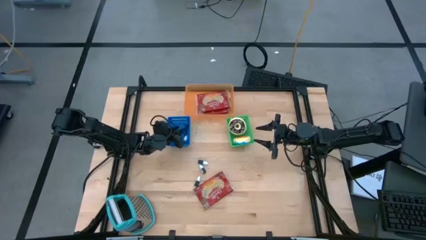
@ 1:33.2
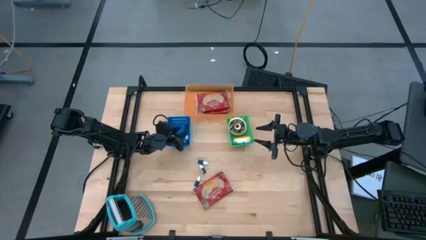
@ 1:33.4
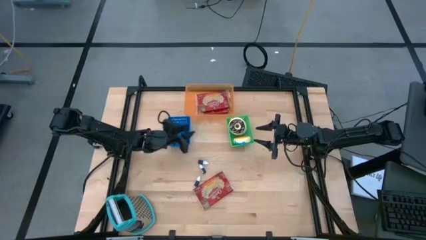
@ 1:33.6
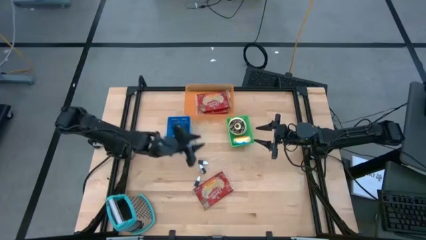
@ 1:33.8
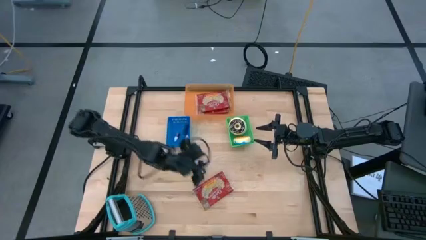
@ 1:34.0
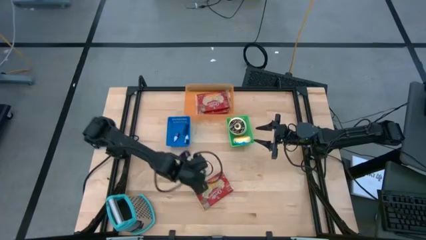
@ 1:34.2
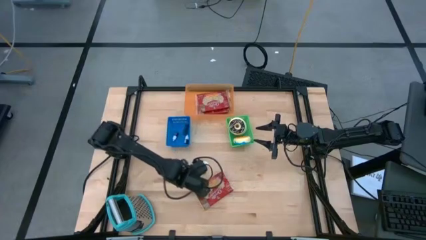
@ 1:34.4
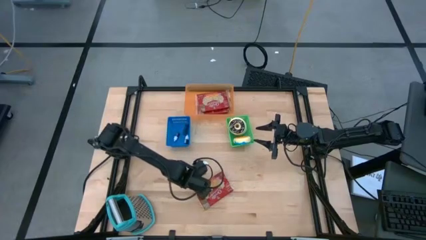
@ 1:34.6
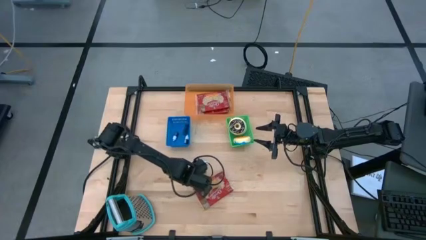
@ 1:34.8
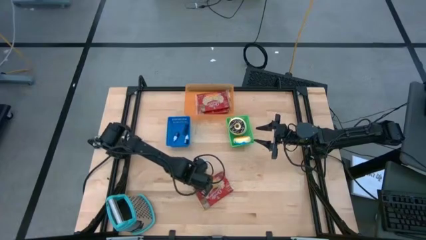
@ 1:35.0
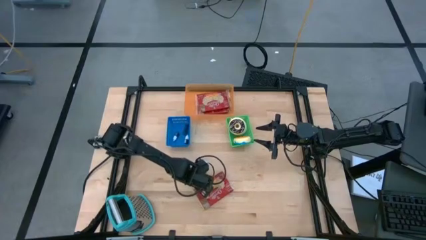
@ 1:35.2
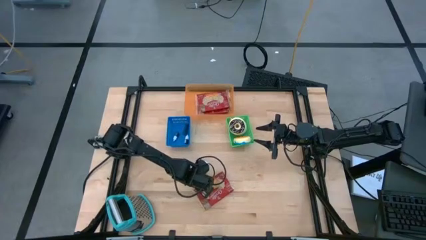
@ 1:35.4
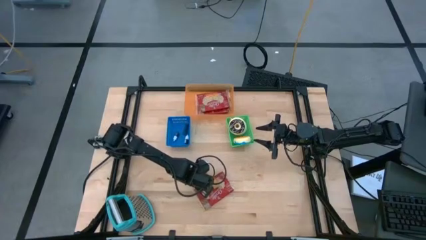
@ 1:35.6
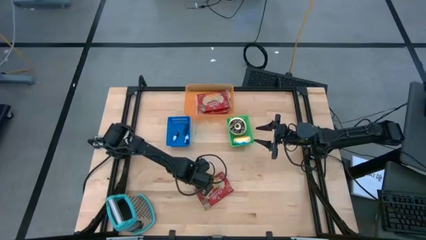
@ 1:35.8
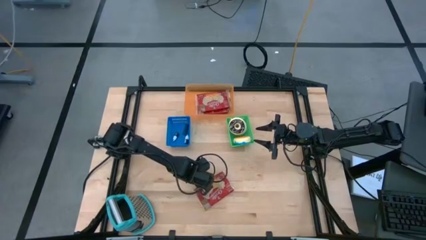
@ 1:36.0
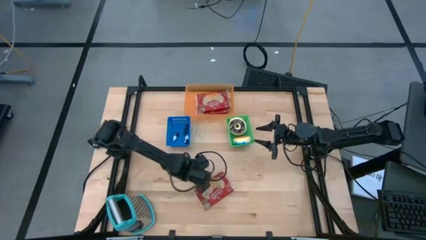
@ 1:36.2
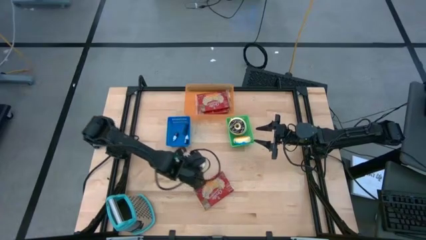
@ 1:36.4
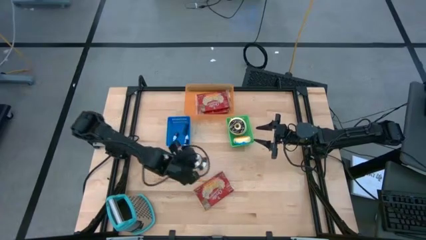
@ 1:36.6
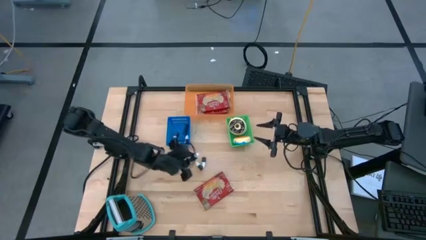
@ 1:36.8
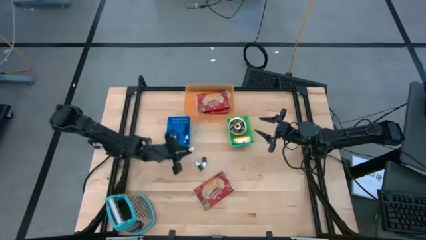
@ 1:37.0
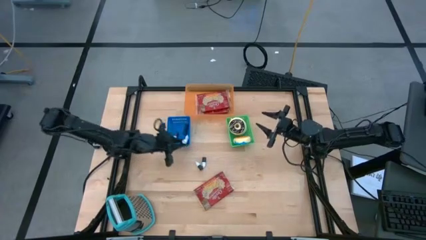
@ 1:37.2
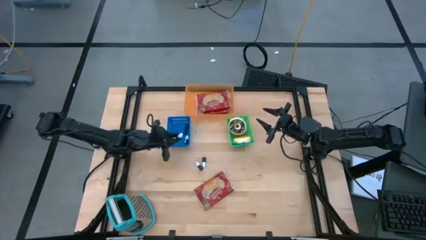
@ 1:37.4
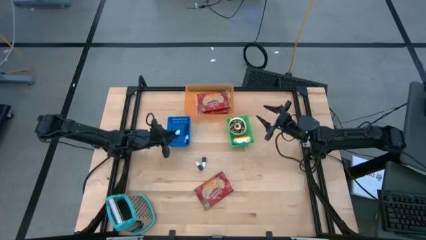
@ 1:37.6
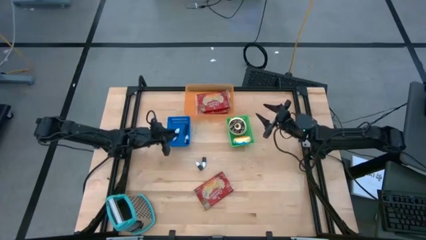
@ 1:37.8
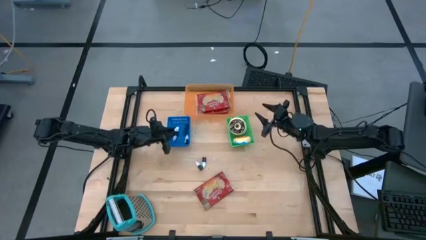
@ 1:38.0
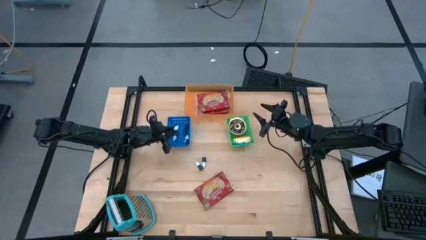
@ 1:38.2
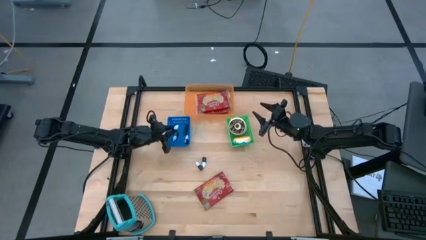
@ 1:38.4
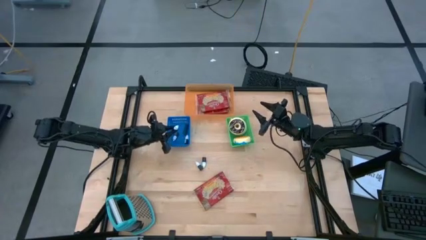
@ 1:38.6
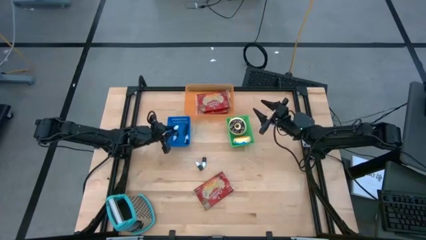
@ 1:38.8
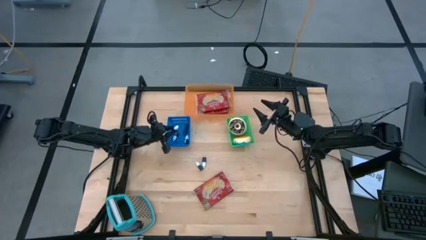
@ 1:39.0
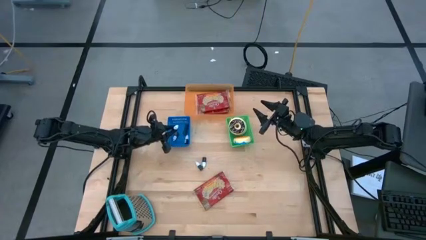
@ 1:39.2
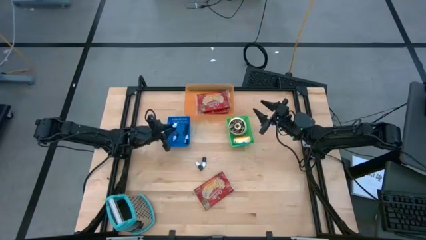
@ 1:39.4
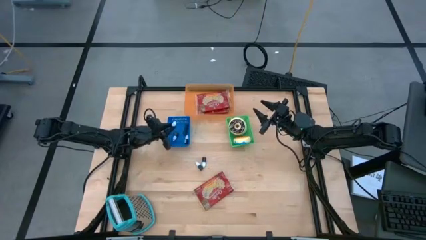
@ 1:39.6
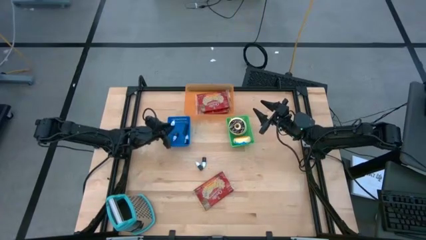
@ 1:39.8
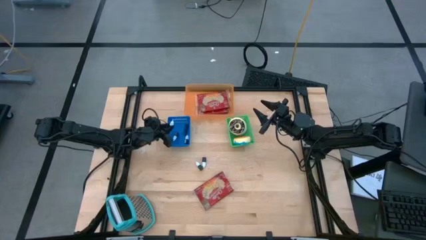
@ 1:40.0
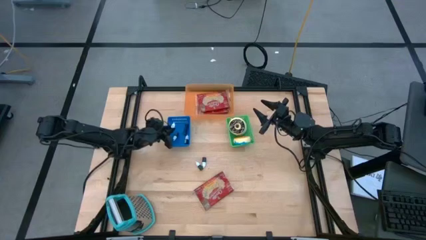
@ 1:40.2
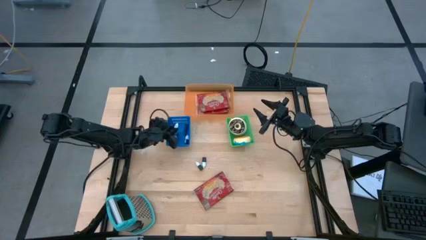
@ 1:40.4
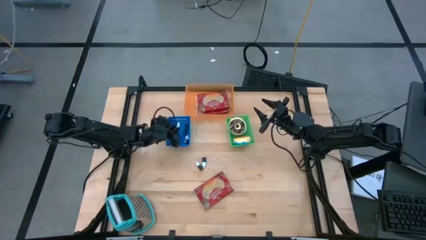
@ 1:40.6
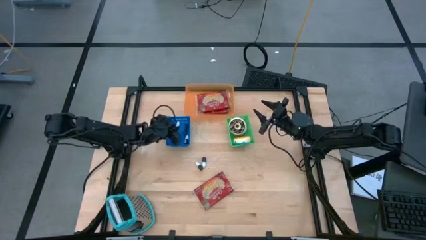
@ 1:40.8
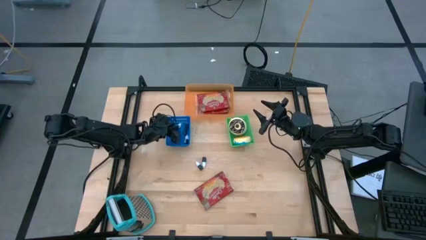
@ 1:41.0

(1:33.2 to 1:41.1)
Put the black food coloring bottle into the blue bin

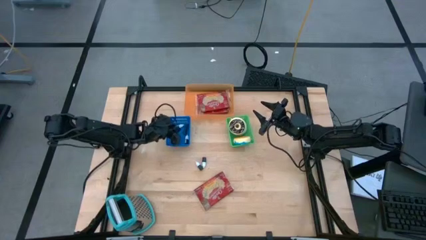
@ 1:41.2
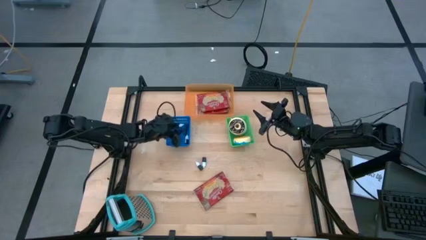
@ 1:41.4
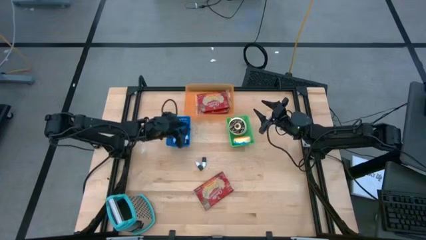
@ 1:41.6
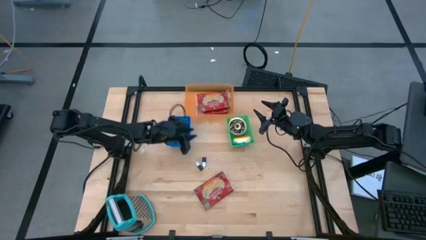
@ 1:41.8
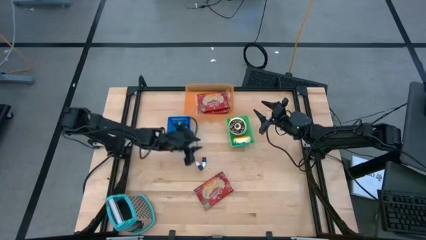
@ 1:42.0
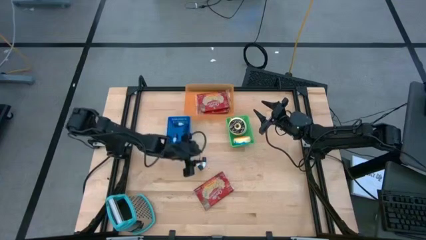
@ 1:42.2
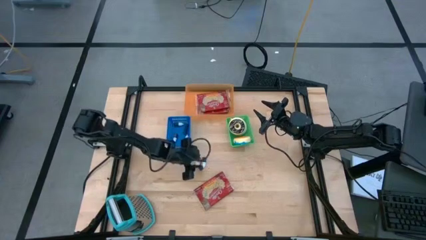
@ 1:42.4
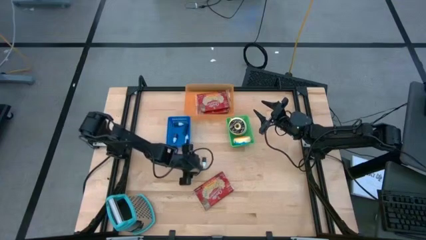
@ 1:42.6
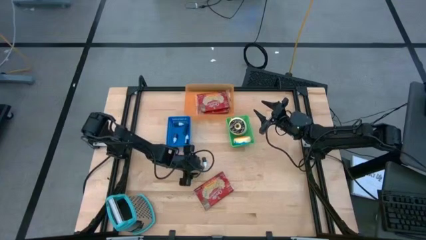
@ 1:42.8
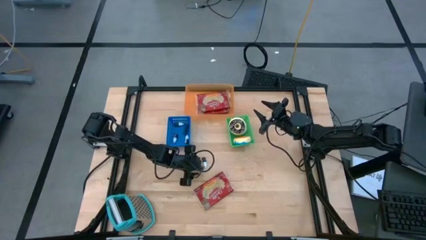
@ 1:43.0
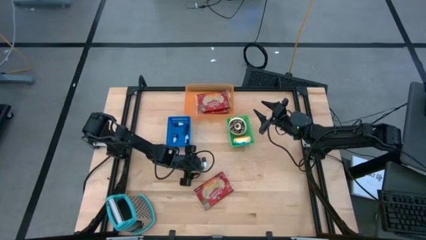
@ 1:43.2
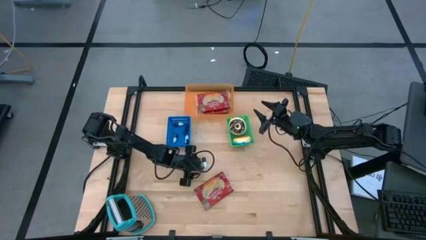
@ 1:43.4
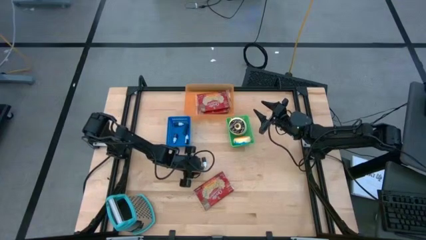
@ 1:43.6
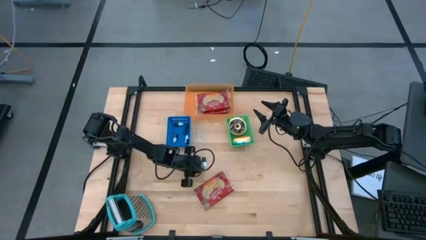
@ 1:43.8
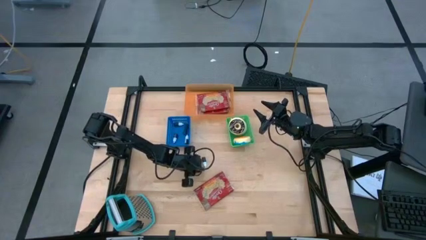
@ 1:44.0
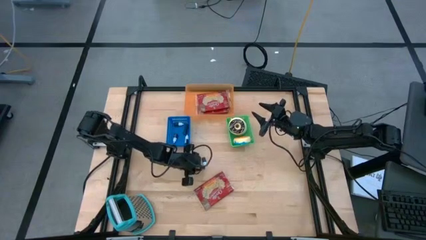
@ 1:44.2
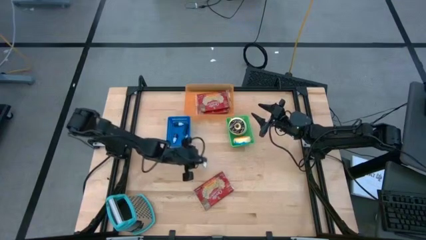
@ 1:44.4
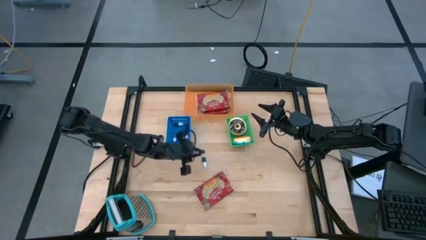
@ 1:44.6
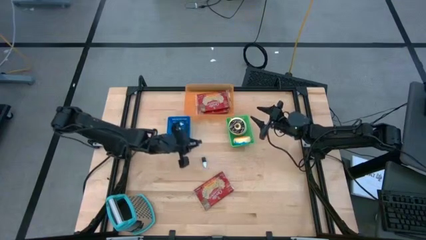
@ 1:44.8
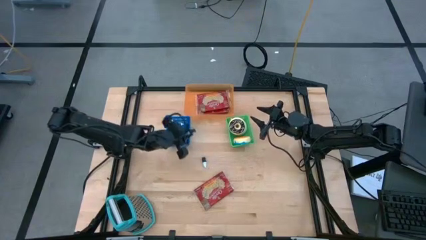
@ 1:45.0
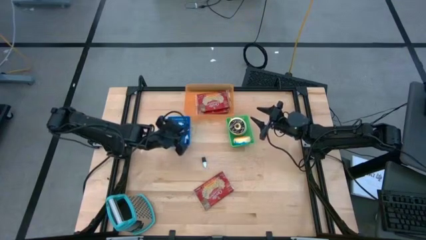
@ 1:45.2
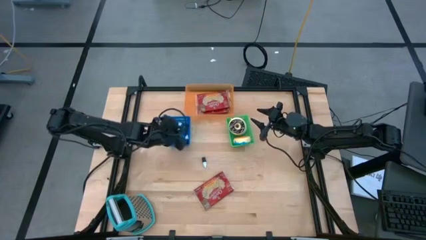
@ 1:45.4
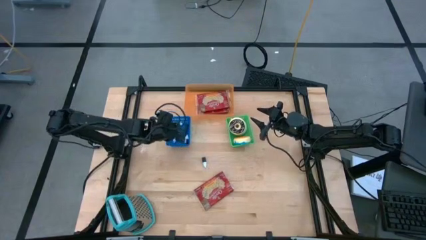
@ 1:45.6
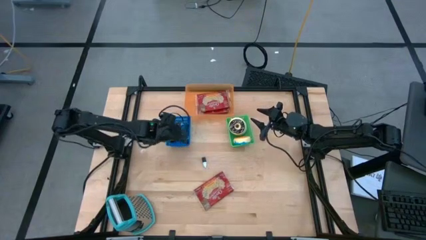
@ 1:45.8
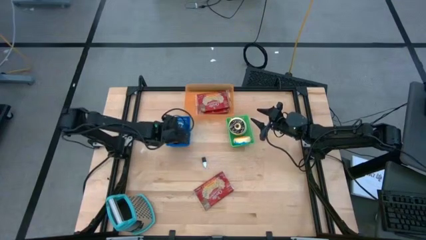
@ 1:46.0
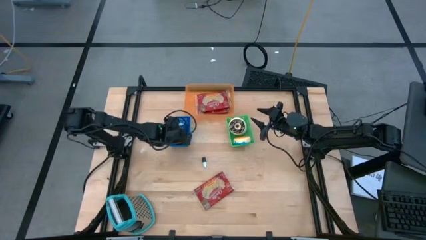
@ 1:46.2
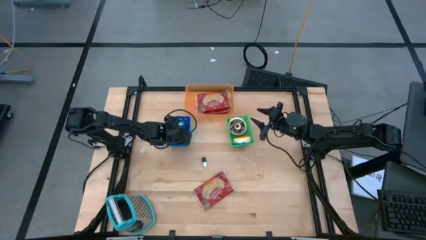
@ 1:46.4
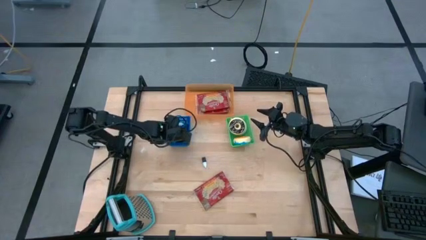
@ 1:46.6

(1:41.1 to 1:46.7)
Put the green food coloring bottle into the blue bin

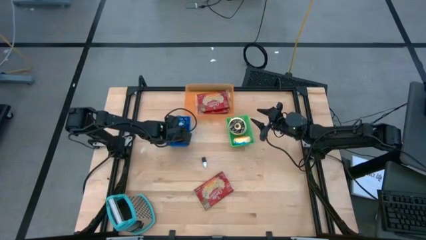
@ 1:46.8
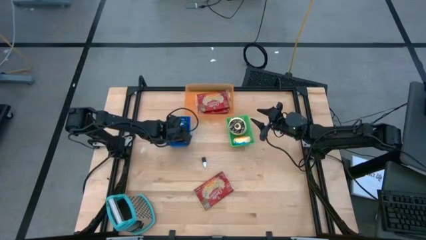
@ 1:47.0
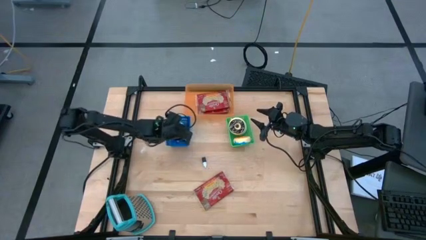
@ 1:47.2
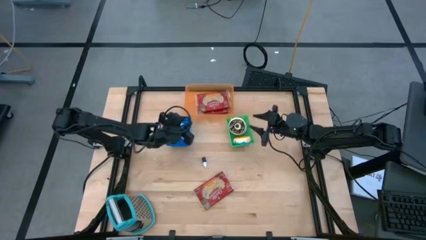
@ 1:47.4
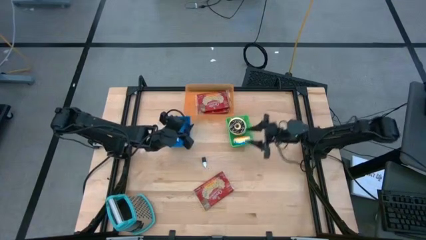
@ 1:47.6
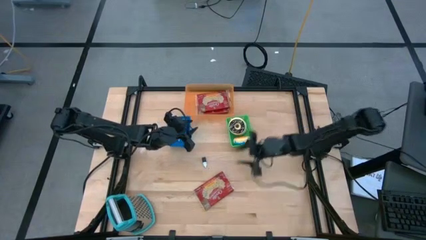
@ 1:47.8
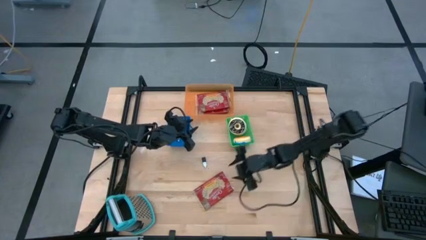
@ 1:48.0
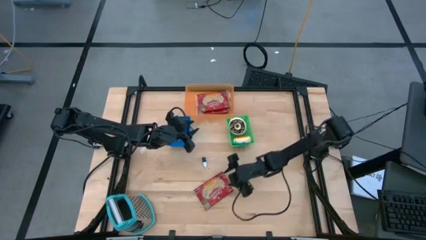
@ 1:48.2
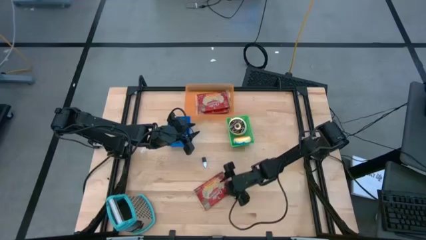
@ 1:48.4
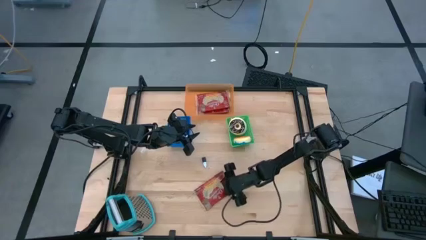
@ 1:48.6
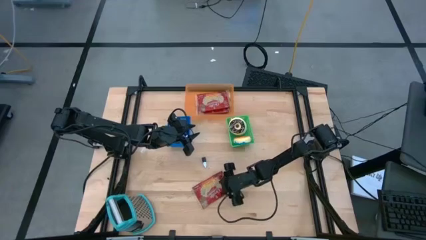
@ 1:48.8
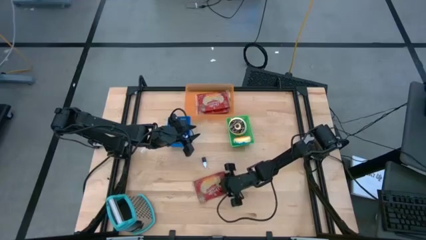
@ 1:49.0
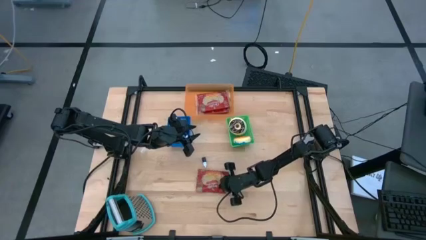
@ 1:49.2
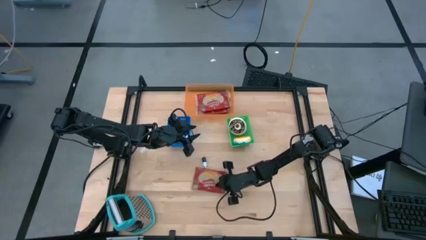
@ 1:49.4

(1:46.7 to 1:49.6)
Put the red popcorn bag into the orange bin
